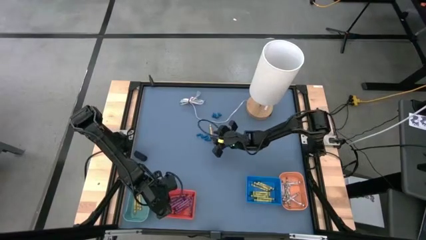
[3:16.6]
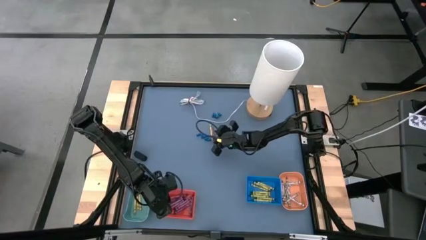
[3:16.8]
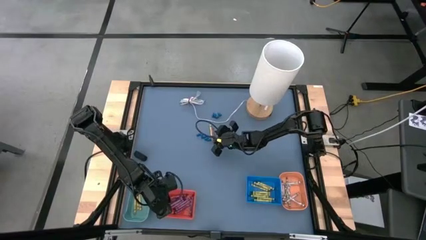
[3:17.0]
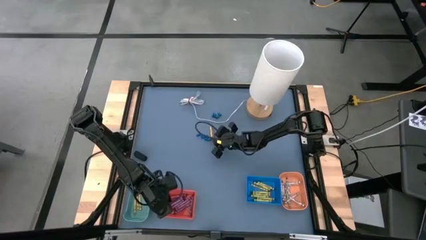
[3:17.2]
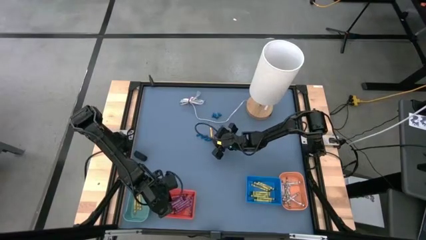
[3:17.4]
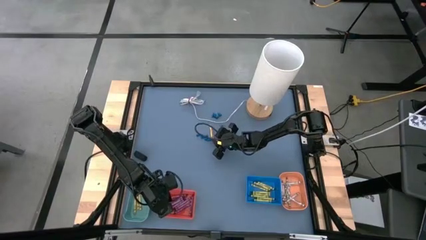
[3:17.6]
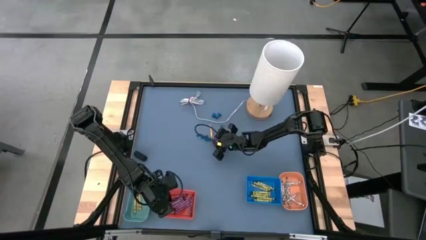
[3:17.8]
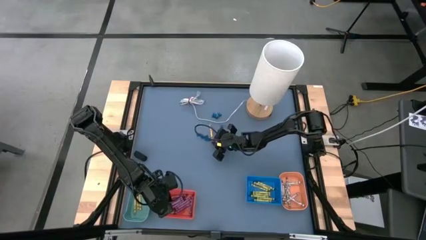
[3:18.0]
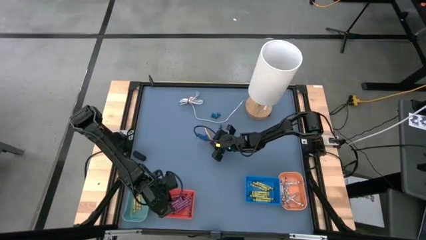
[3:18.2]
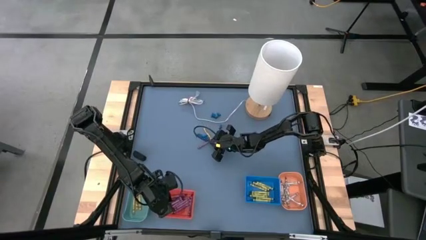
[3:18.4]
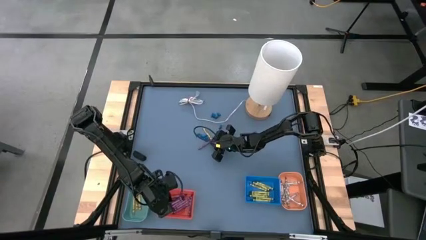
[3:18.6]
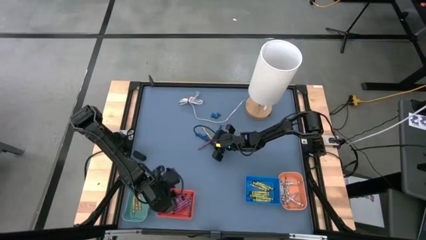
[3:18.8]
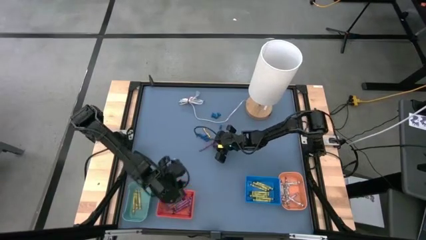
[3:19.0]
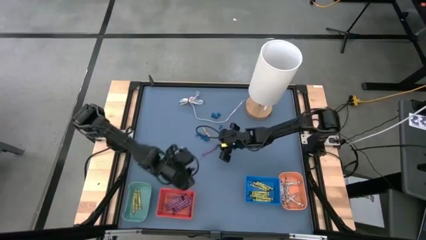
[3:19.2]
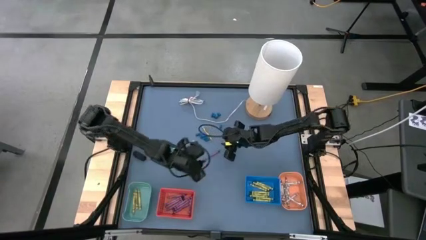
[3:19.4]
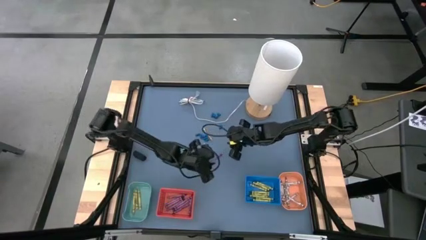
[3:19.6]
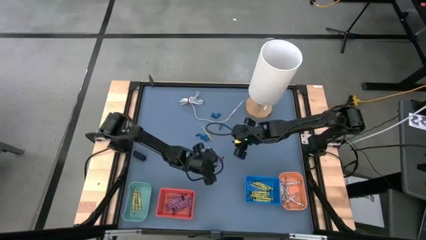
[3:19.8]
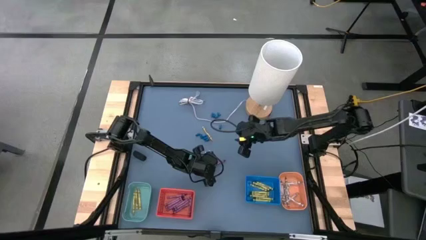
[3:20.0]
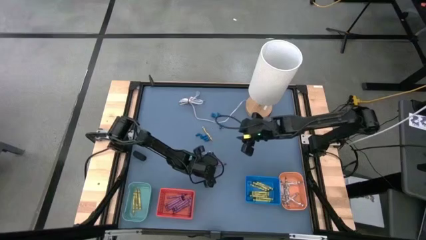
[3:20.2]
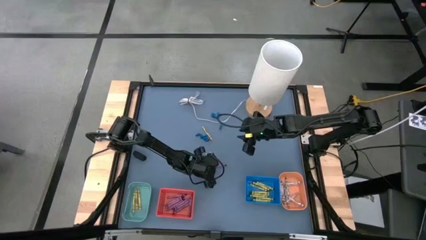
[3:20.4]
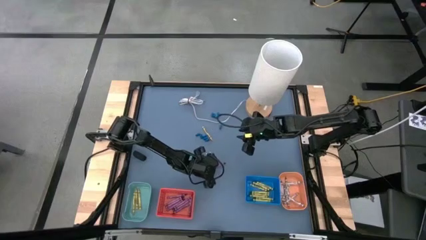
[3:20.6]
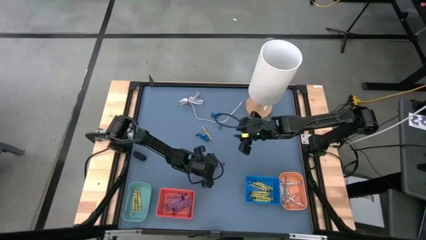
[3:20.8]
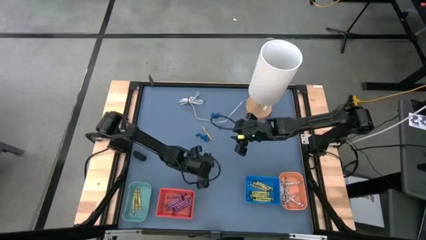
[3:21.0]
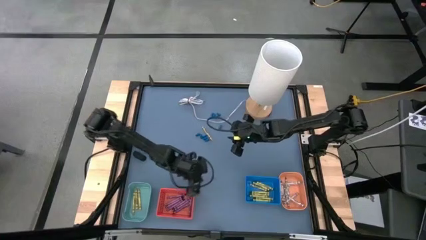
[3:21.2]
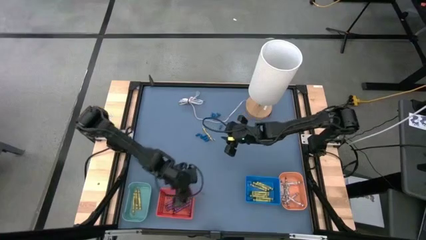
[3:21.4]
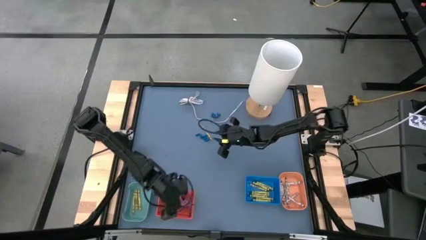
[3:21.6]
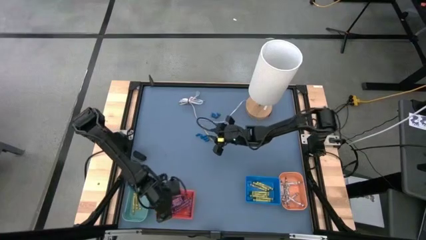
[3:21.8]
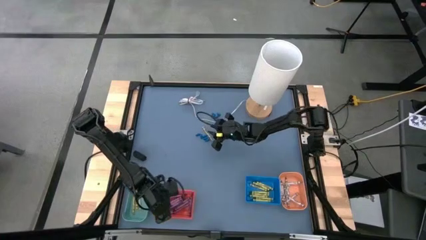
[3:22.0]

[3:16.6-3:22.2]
Task: Sort crayons
Put the red crayon into the red basket

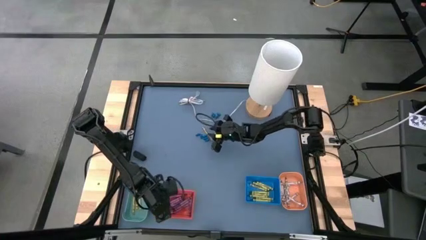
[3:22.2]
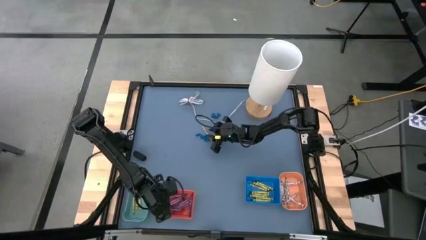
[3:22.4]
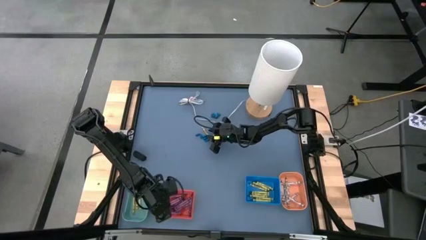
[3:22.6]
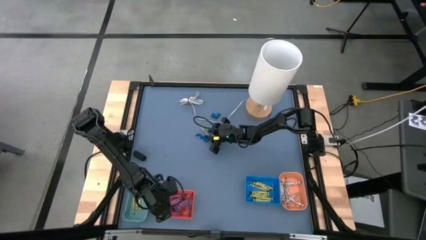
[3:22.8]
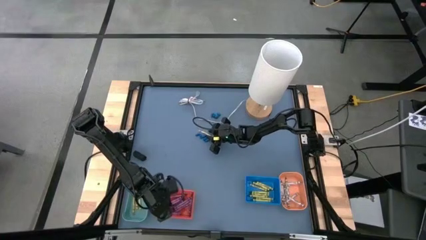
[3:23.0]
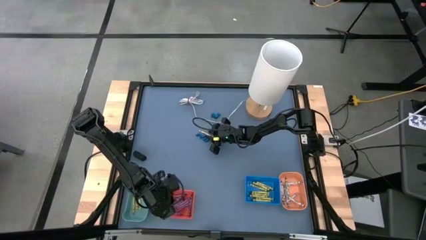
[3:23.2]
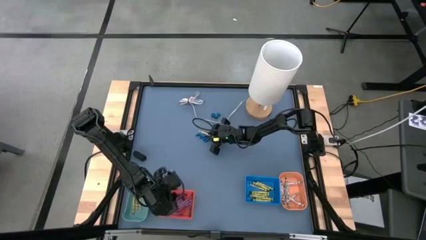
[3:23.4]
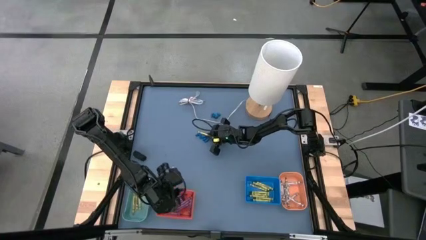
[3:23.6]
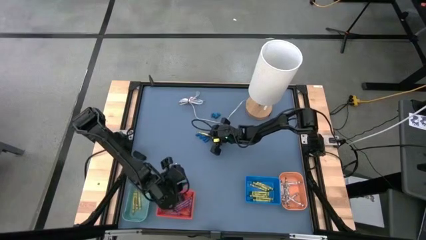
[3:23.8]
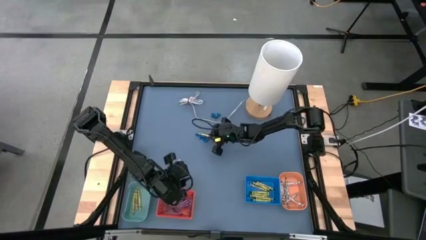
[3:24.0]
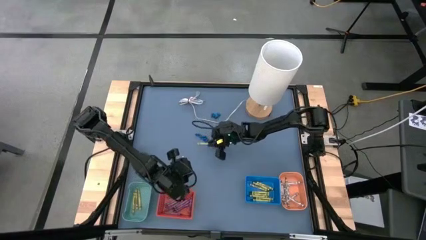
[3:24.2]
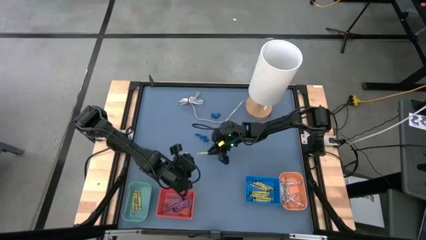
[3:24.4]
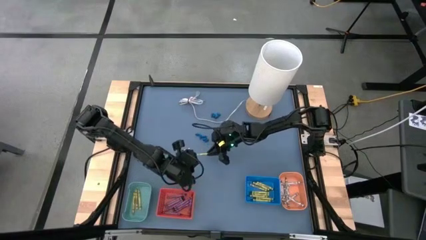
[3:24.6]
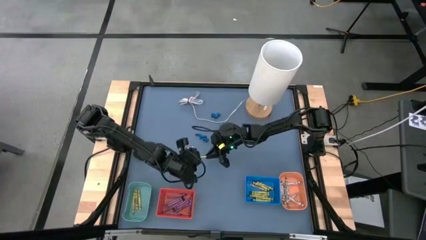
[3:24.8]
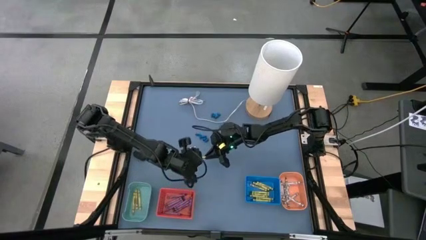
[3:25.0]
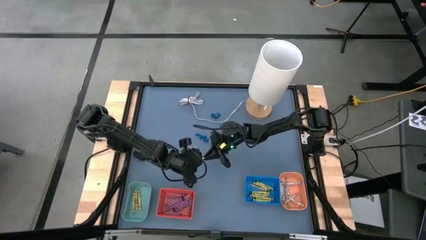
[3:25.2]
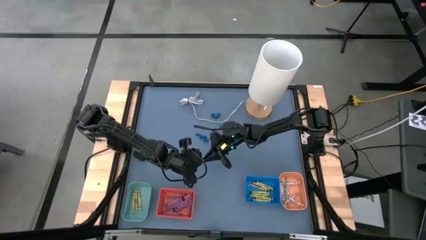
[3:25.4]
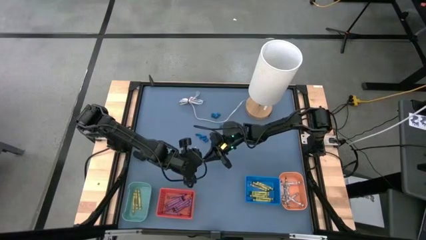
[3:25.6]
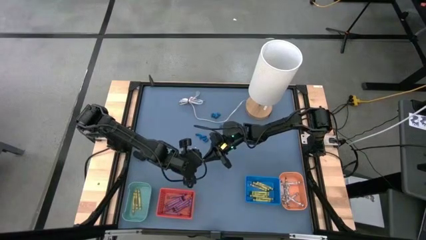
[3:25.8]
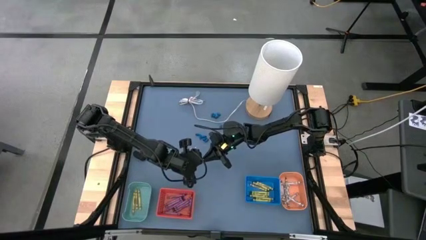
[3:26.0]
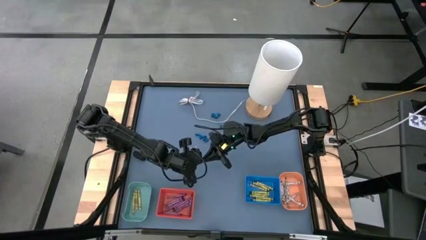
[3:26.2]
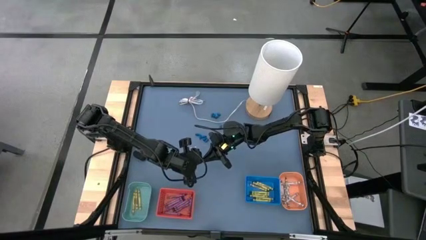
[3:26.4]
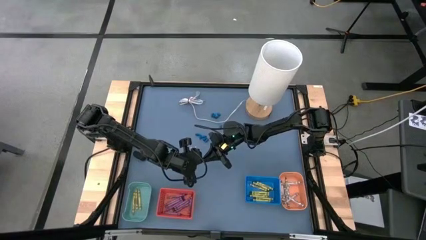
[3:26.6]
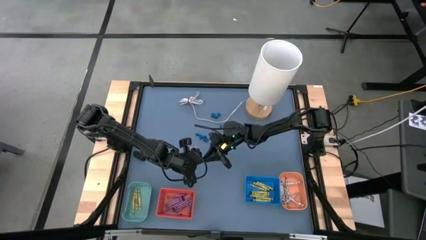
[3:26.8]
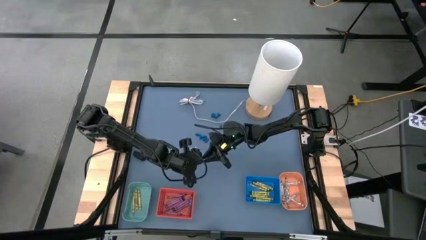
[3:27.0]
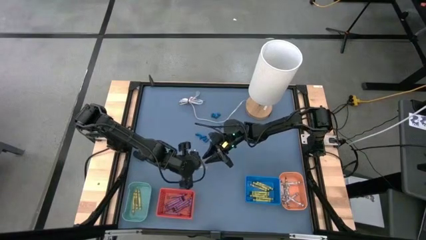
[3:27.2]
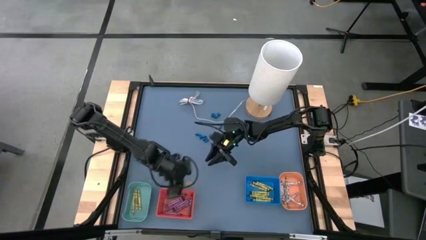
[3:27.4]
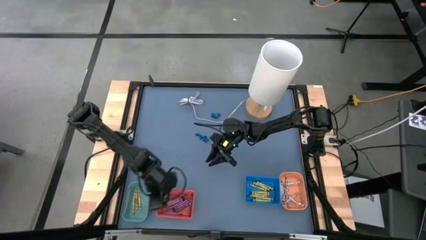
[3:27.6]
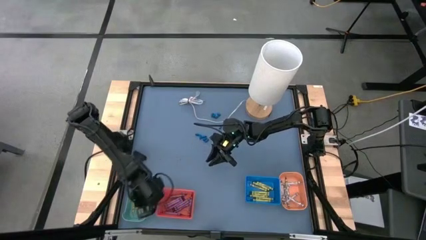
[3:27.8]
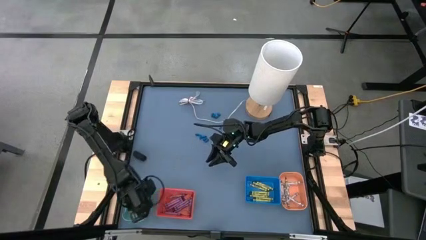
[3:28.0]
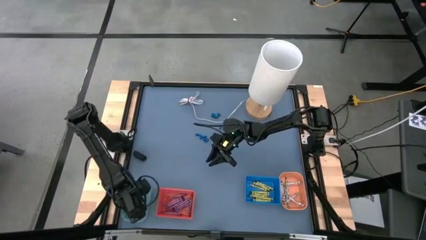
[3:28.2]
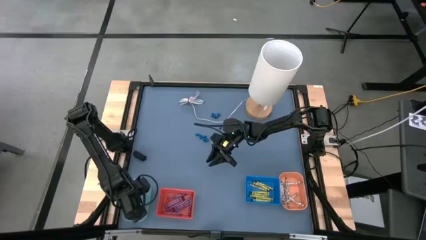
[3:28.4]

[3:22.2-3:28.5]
Put the yellow crayon into the blue basket

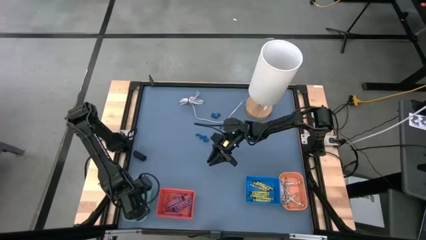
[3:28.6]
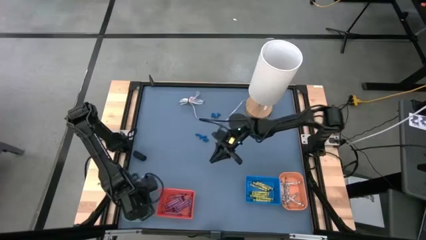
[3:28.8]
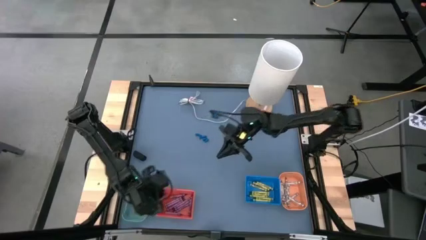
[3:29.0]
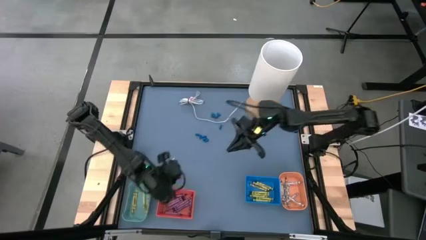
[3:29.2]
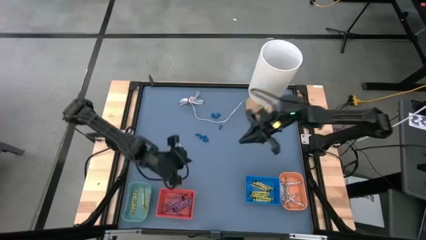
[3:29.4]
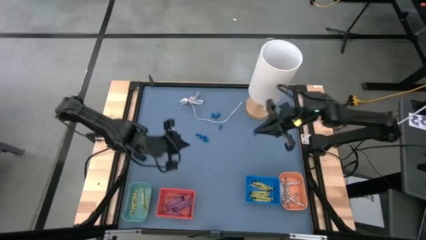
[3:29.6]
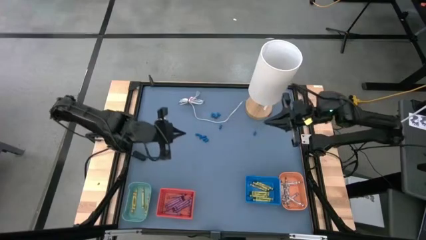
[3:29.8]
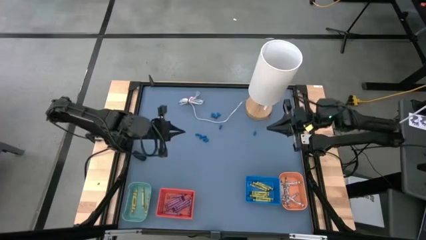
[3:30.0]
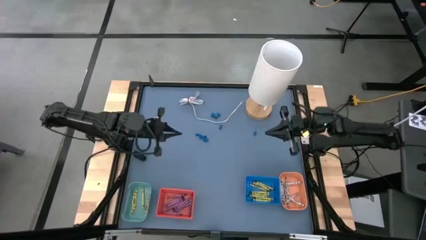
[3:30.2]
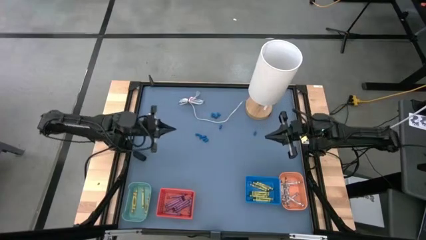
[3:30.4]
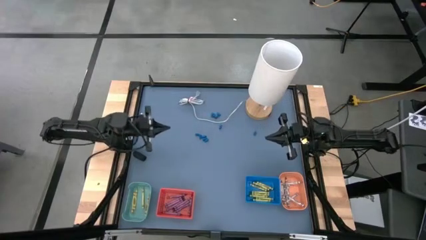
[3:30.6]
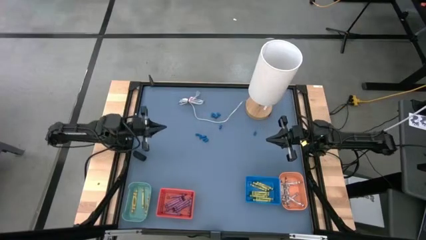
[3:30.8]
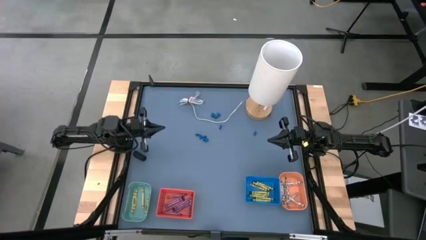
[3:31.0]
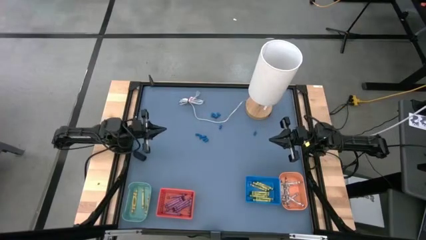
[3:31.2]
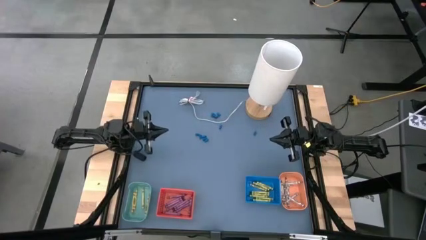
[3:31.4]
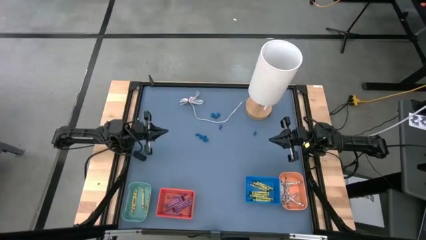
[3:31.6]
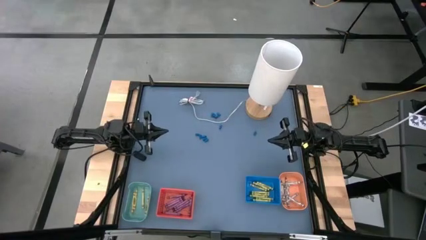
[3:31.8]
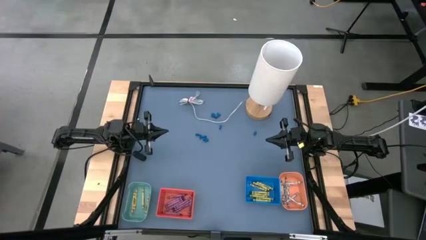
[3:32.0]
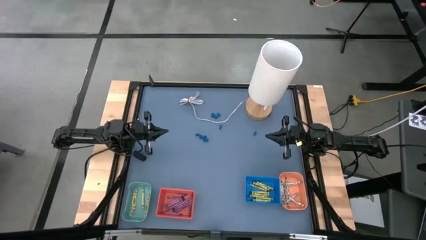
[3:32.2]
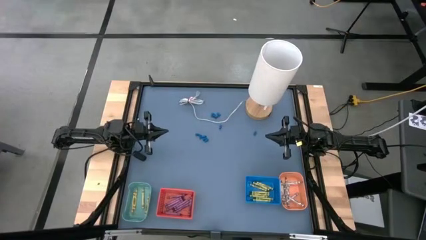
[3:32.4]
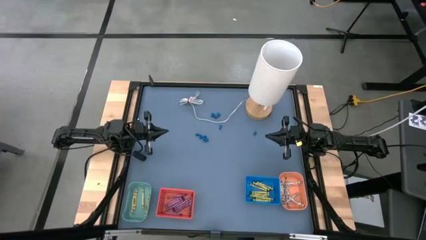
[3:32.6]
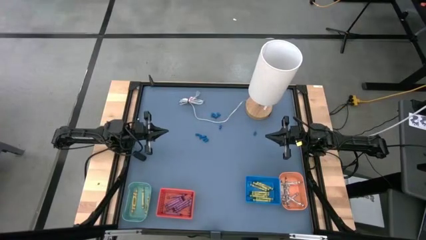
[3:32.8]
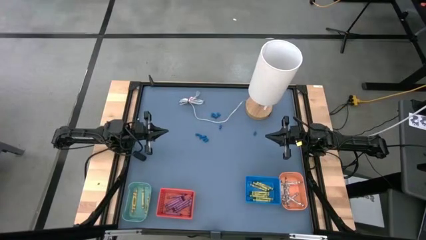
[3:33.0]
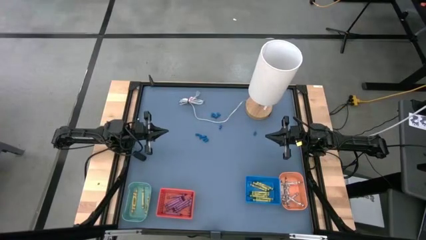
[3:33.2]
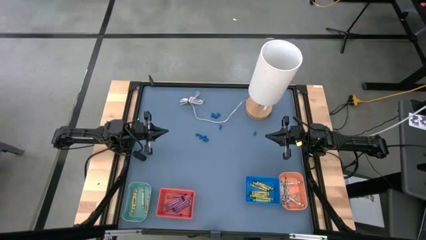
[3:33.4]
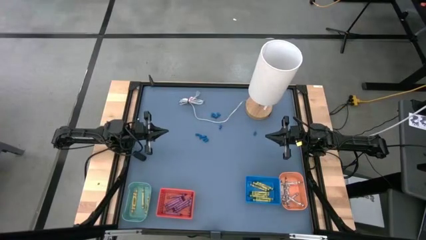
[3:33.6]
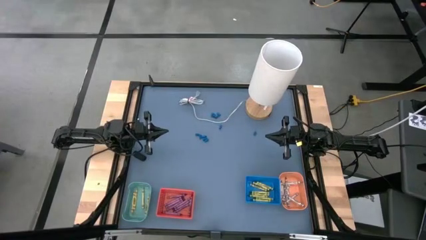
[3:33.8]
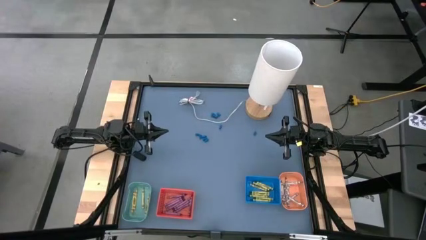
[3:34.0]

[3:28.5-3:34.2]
Return to Home Position
